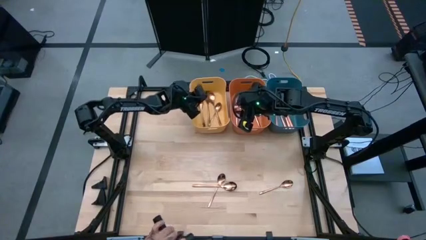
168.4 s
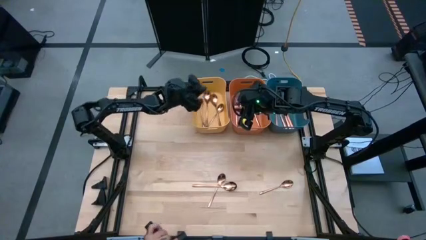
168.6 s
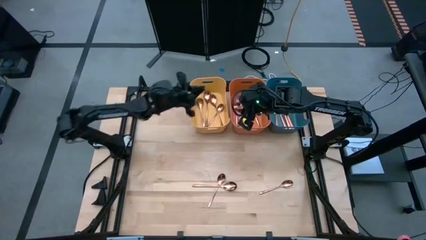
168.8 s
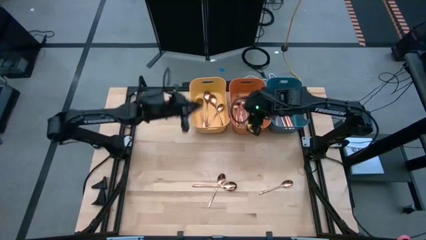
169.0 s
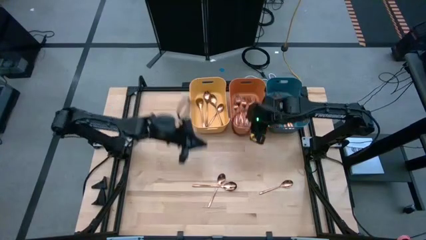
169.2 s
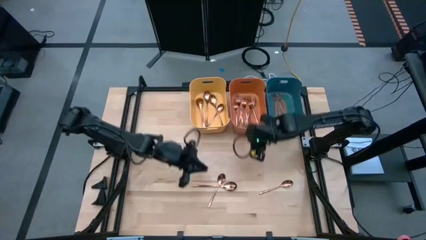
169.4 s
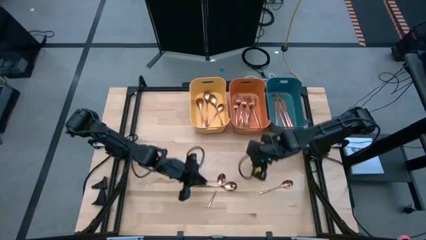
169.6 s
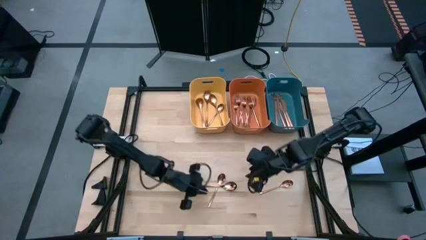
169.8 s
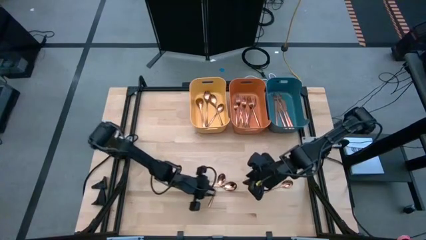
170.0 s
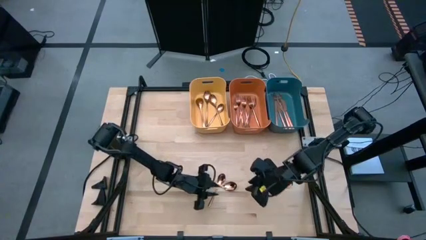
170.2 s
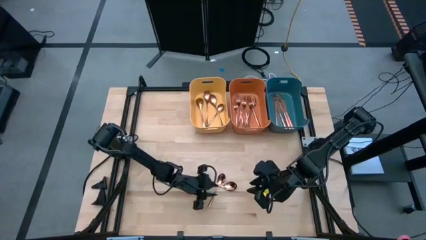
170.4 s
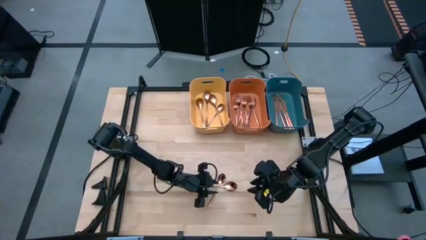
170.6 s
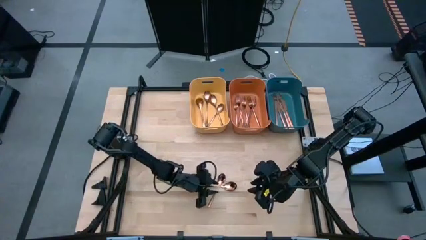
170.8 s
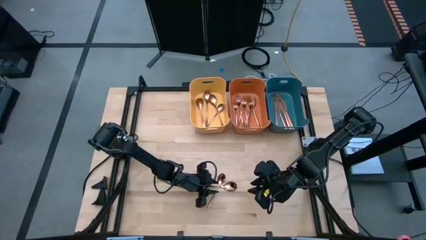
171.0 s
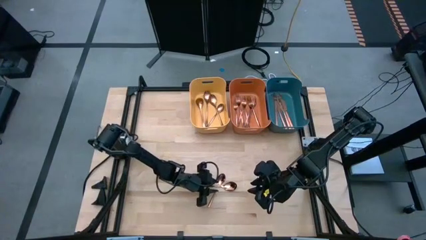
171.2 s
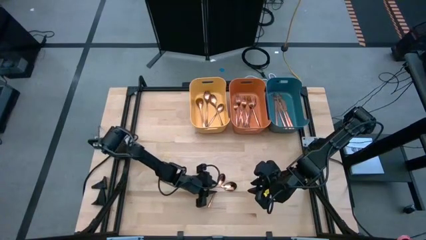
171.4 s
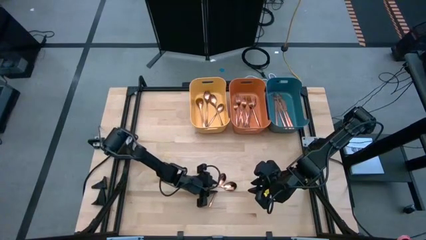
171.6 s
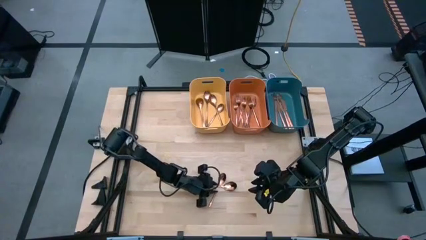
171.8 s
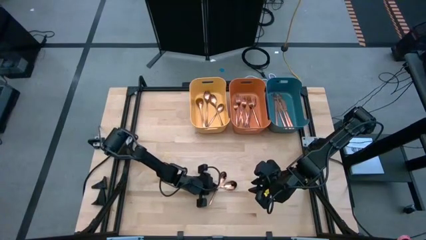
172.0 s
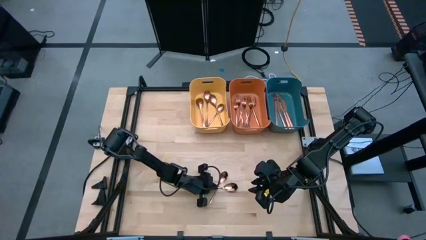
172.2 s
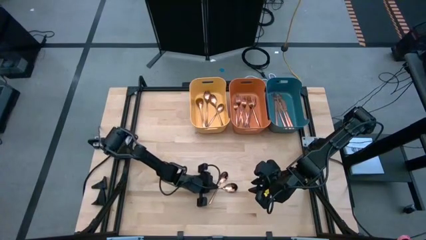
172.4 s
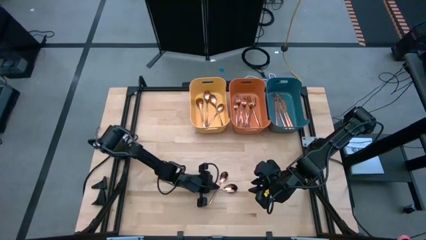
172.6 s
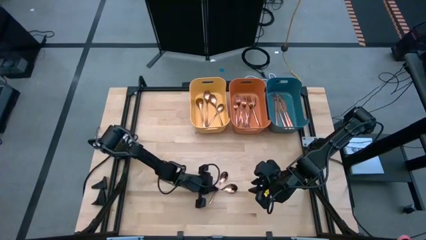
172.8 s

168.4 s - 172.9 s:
Task: Sort silverware
Put the copper spoon into the yellow bin

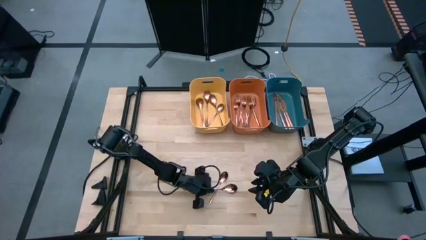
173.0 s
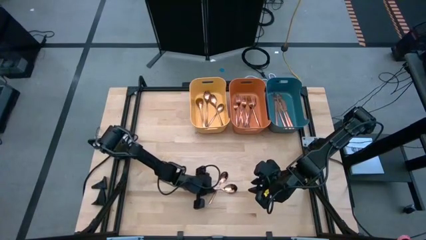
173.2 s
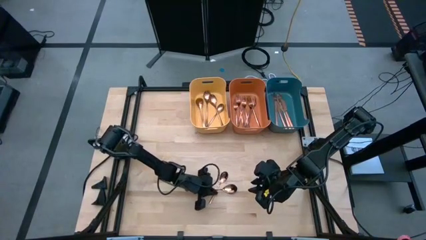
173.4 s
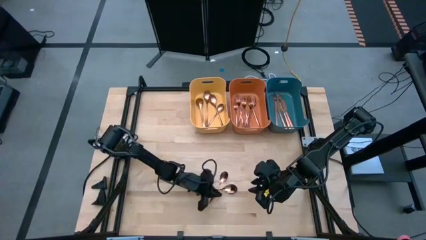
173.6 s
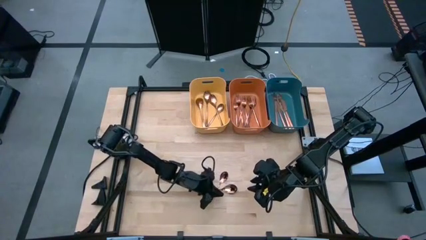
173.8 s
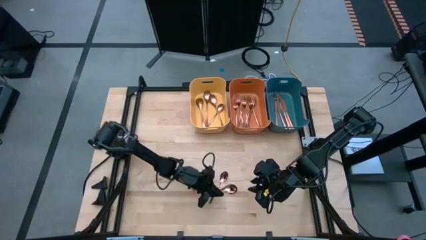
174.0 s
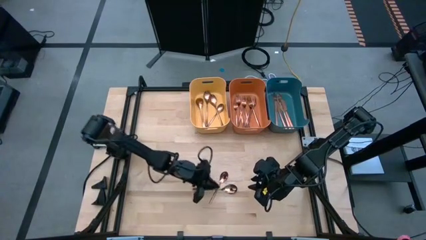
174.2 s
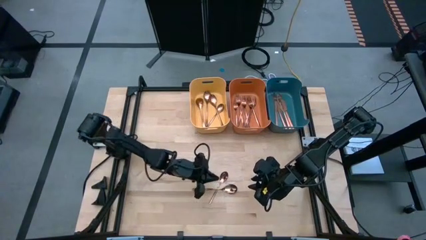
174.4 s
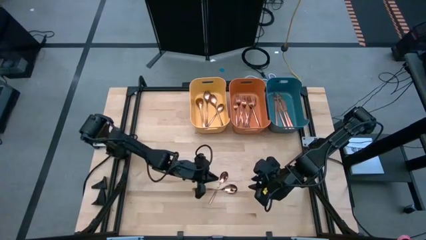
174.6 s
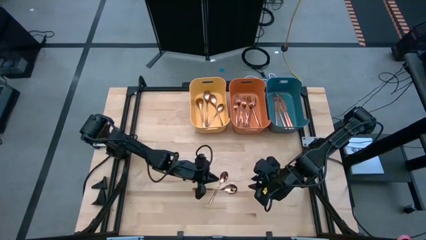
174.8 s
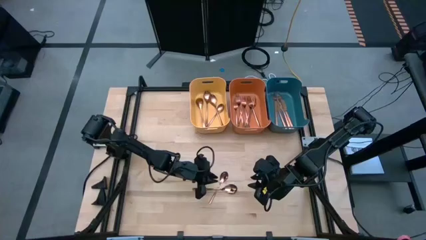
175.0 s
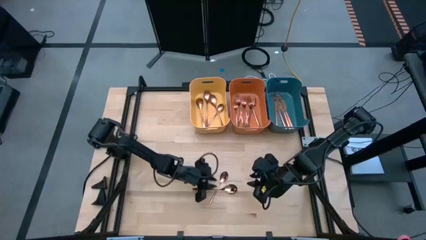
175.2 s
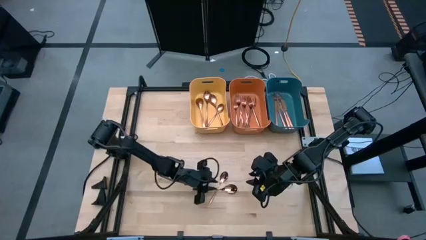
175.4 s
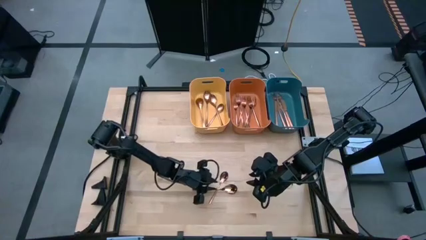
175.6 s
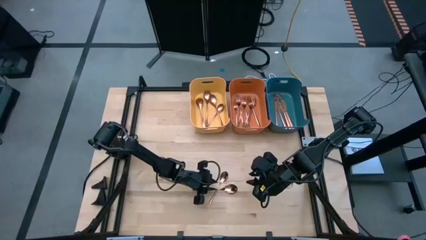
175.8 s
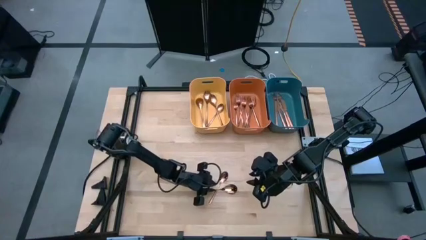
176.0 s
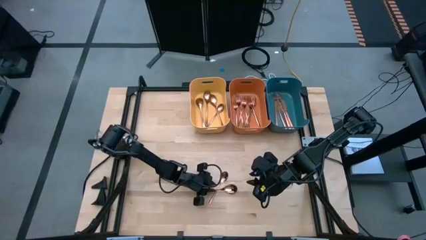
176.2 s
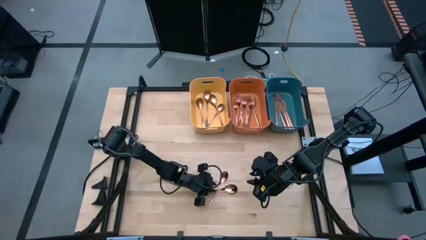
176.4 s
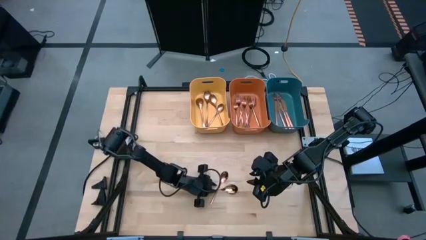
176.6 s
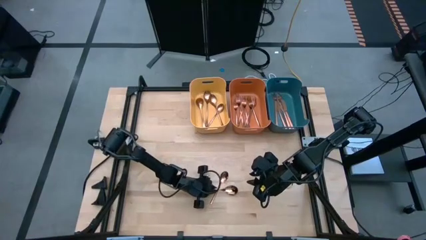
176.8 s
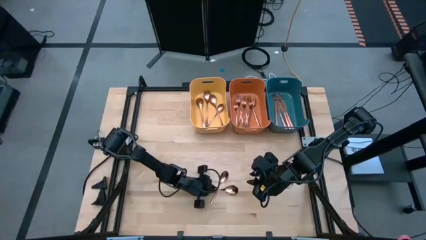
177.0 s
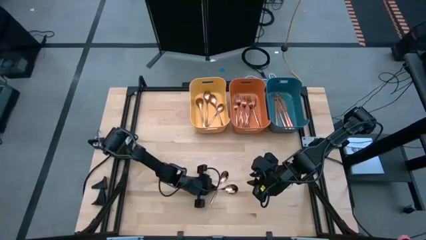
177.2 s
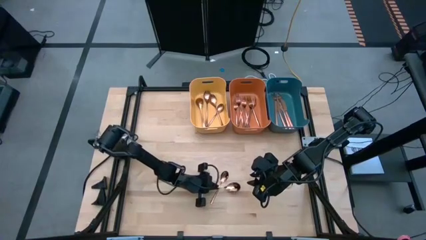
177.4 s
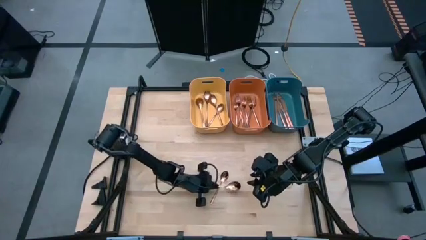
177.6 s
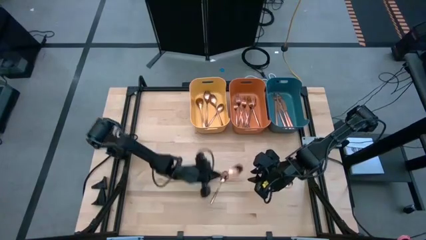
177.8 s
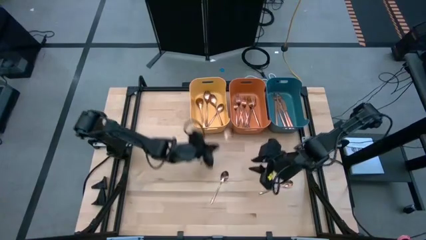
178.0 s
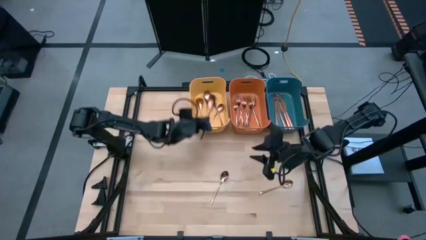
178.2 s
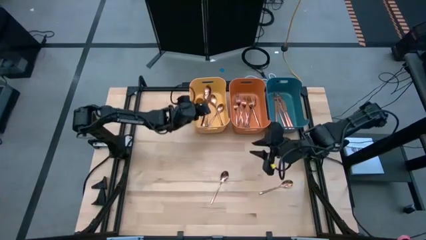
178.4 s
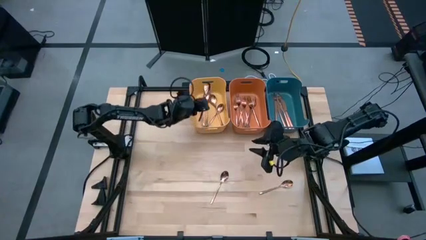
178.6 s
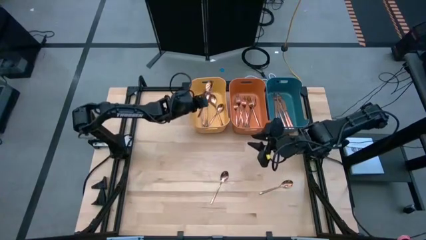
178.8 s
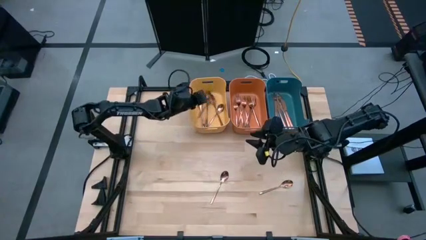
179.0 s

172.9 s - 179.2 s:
Put the copper spoon into the yellow bin

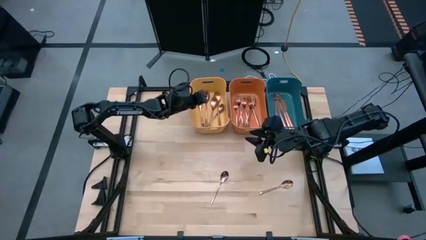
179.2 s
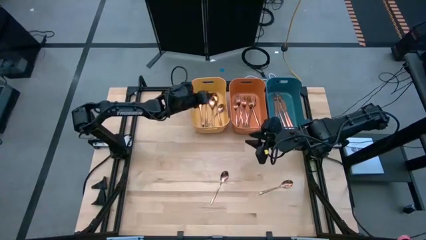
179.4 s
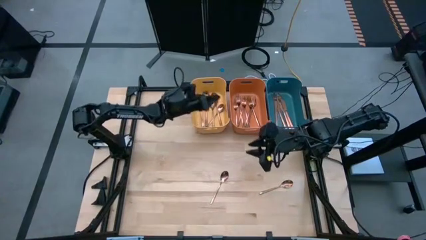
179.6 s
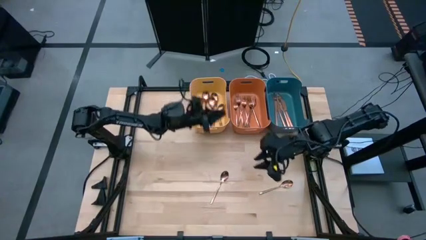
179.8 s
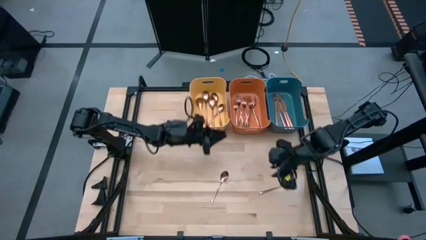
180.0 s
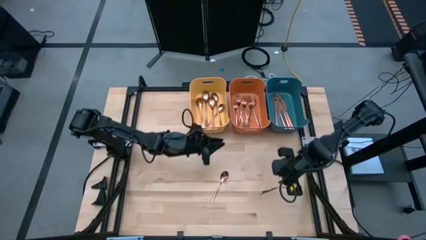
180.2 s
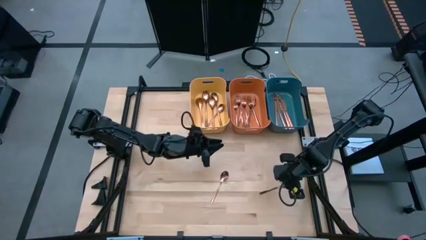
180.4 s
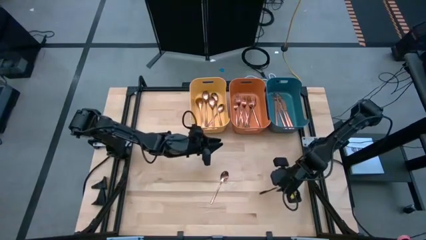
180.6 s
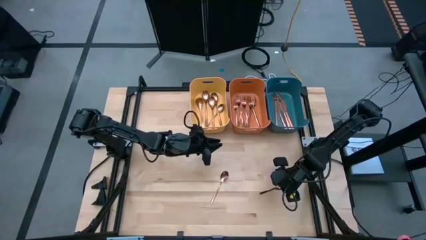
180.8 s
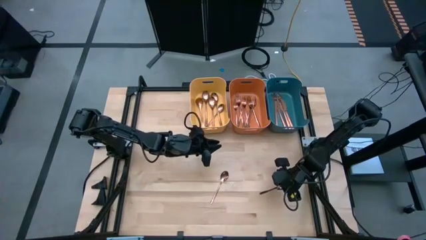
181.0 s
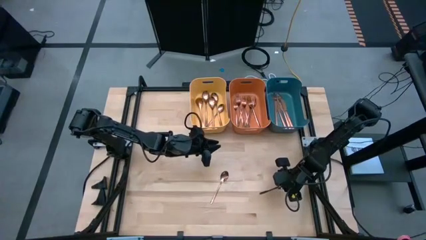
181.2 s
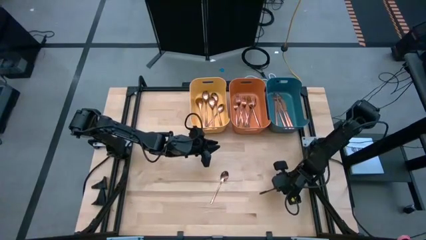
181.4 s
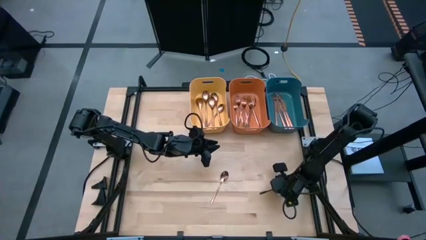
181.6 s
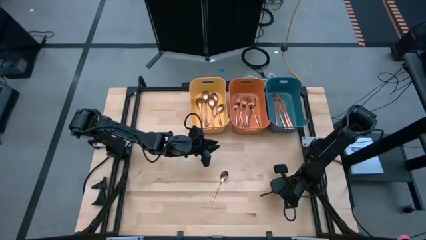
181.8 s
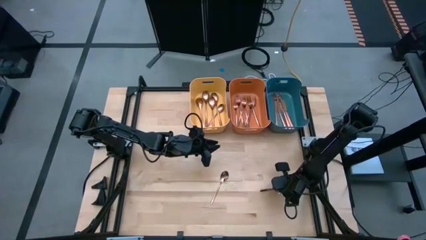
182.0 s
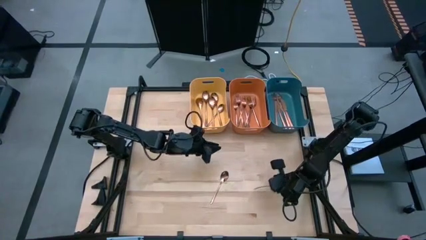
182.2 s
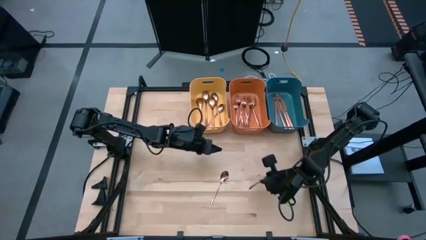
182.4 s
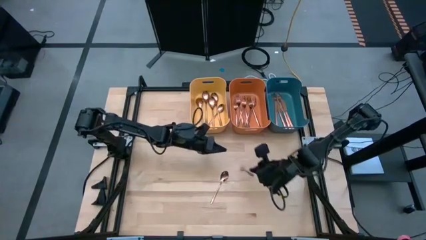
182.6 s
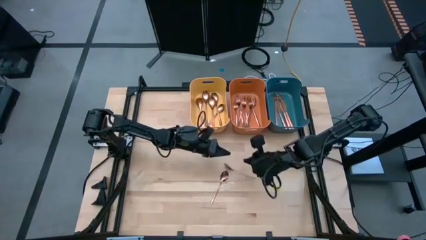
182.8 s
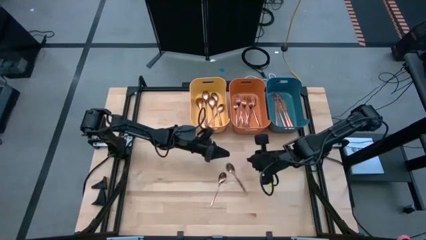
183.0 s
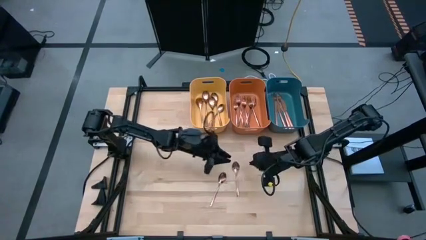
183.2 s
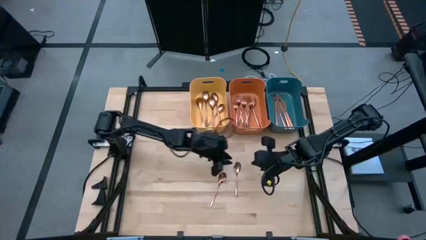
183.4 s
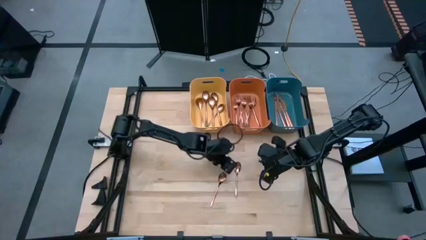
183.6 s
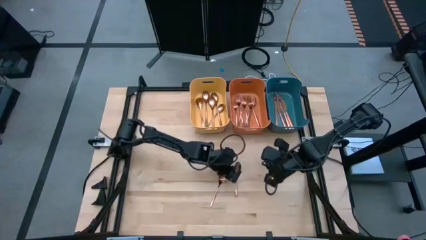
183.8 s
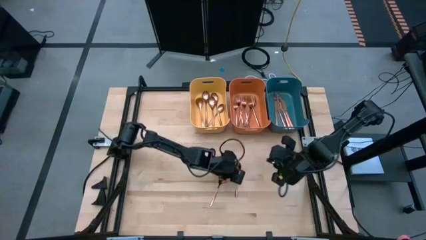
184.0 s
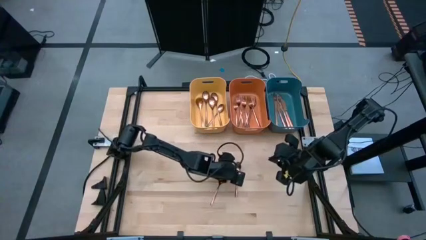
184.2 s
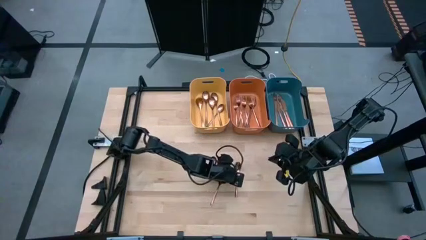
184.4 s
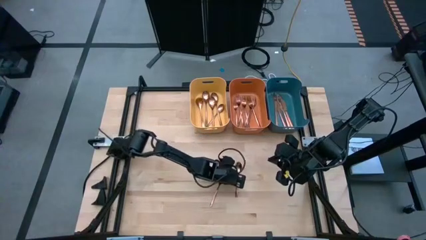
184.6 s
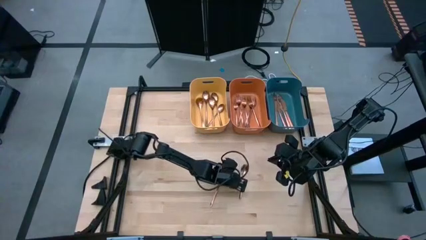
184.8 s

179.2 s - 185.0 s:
Put the copper spoon into the yellow bin
